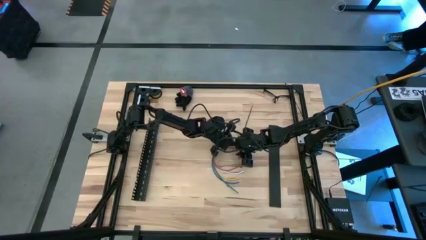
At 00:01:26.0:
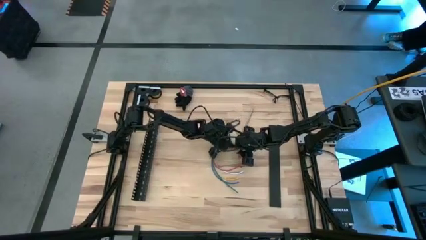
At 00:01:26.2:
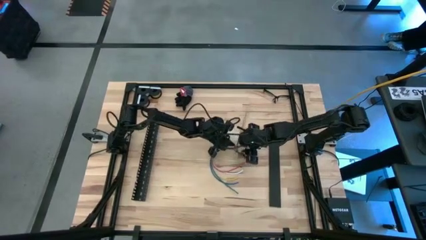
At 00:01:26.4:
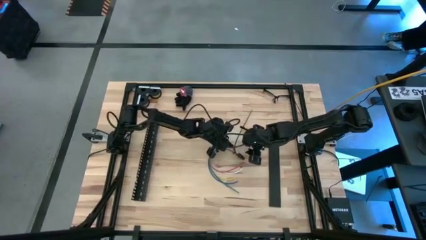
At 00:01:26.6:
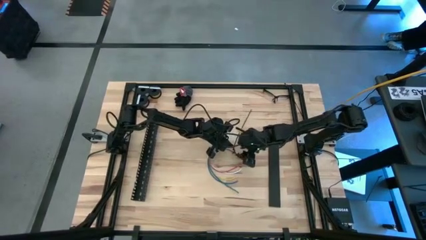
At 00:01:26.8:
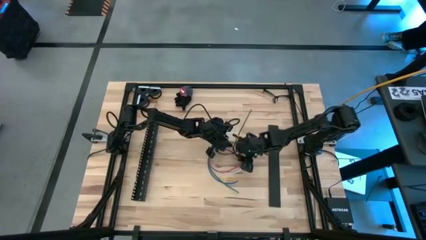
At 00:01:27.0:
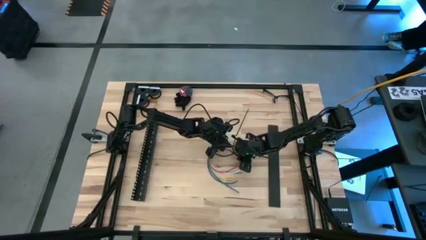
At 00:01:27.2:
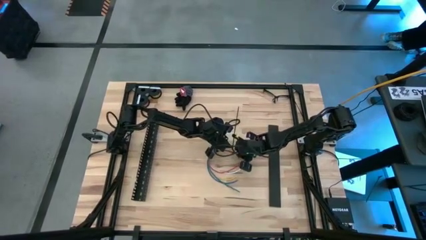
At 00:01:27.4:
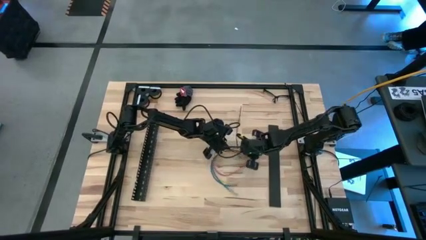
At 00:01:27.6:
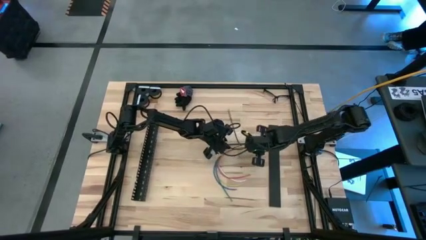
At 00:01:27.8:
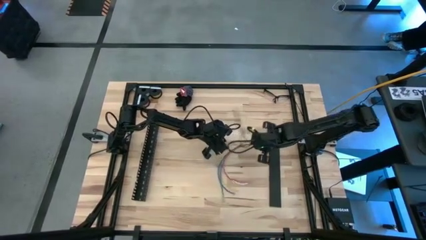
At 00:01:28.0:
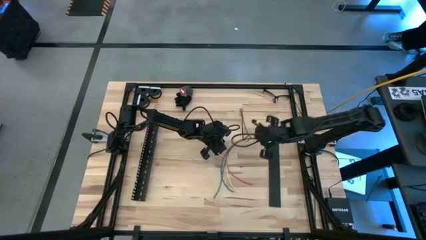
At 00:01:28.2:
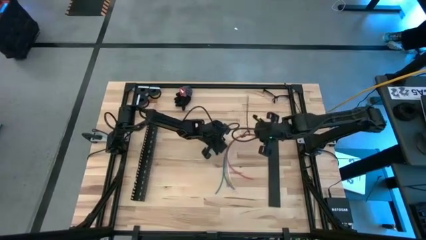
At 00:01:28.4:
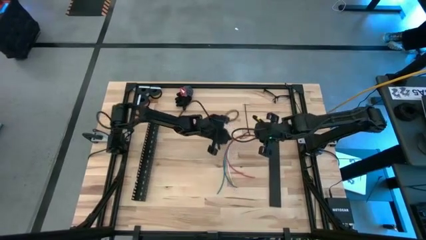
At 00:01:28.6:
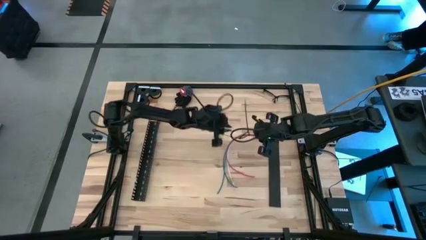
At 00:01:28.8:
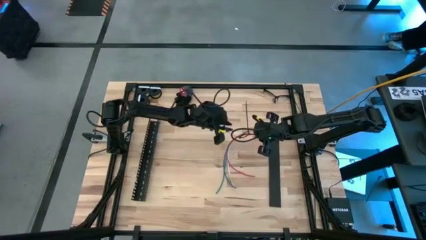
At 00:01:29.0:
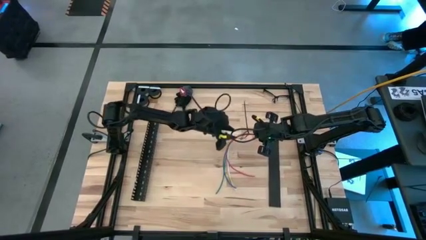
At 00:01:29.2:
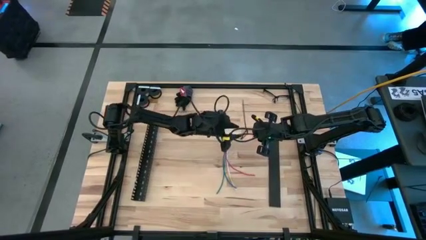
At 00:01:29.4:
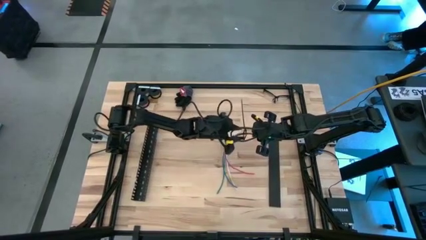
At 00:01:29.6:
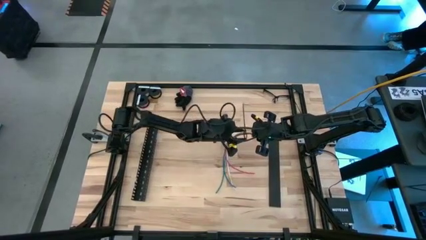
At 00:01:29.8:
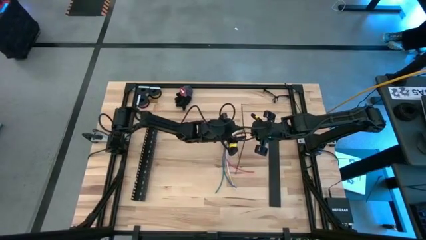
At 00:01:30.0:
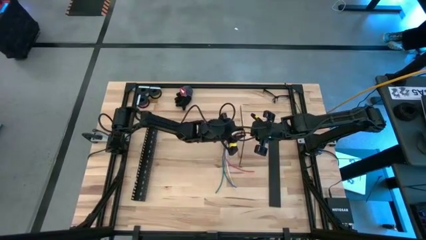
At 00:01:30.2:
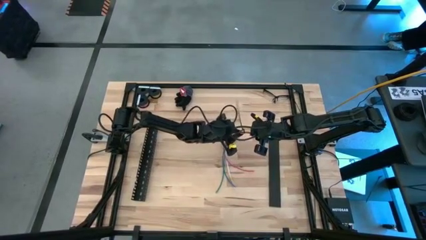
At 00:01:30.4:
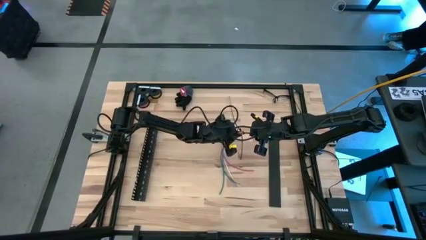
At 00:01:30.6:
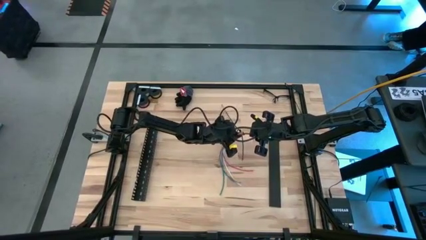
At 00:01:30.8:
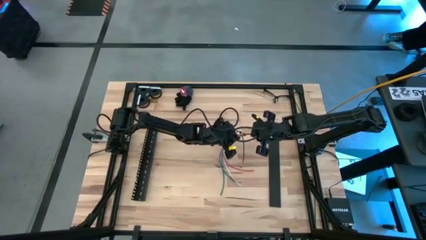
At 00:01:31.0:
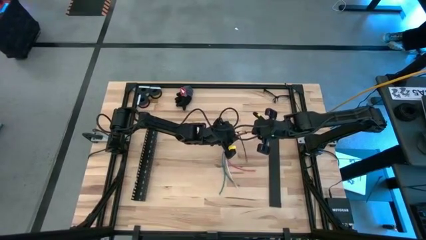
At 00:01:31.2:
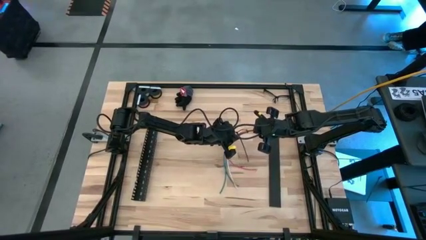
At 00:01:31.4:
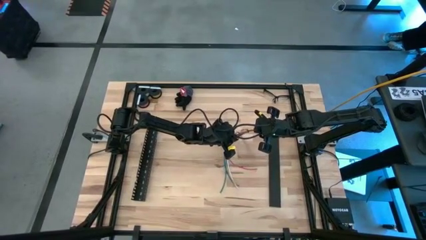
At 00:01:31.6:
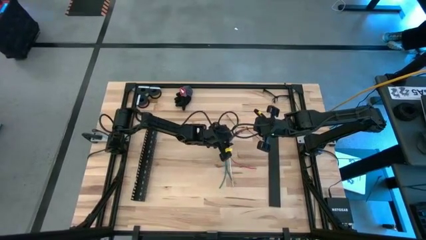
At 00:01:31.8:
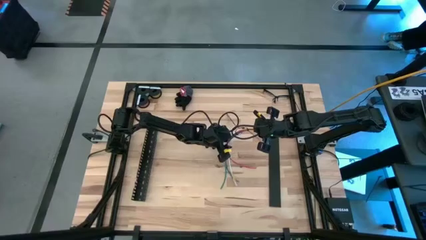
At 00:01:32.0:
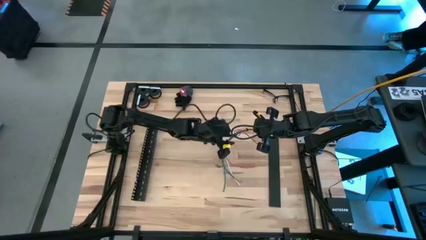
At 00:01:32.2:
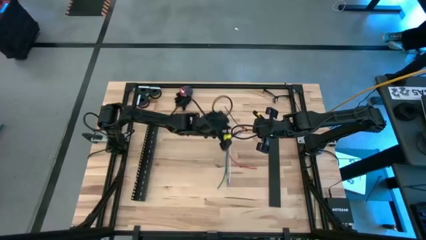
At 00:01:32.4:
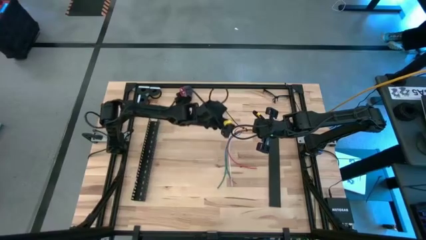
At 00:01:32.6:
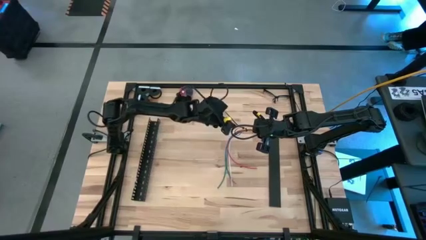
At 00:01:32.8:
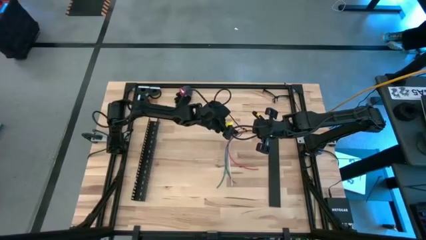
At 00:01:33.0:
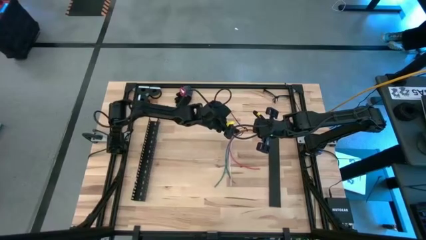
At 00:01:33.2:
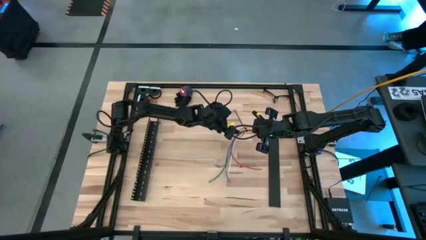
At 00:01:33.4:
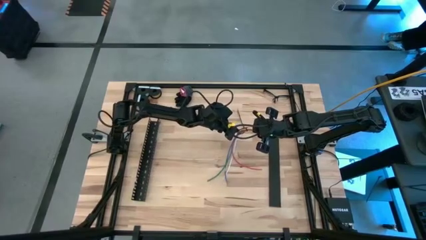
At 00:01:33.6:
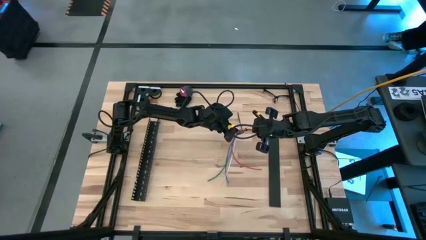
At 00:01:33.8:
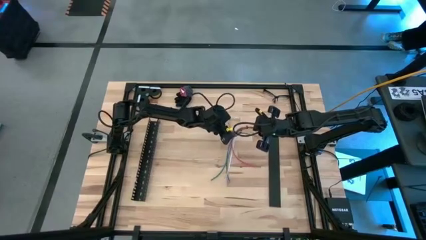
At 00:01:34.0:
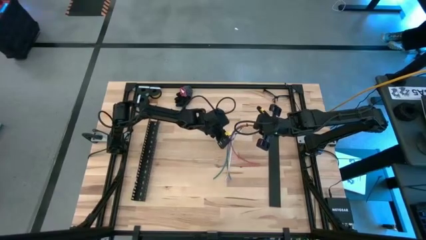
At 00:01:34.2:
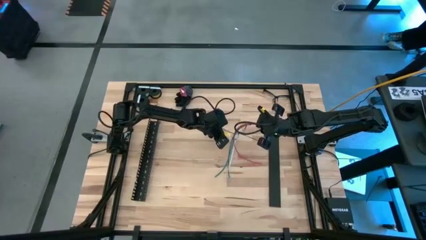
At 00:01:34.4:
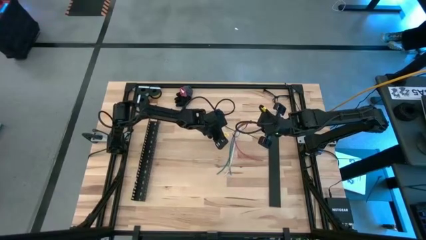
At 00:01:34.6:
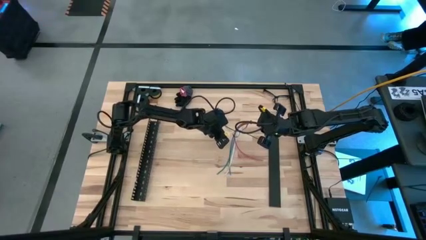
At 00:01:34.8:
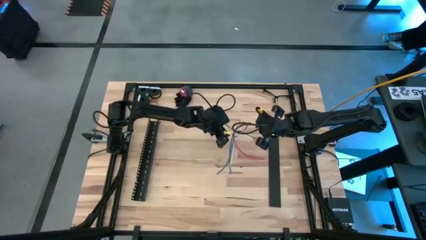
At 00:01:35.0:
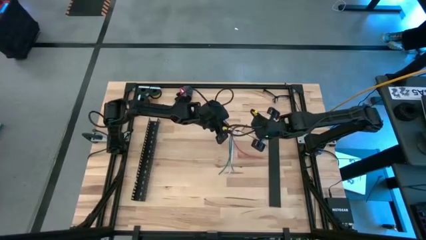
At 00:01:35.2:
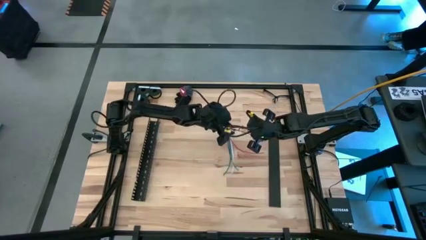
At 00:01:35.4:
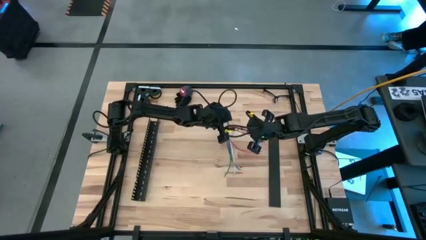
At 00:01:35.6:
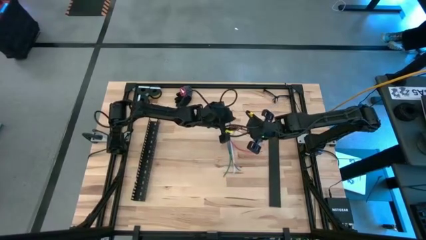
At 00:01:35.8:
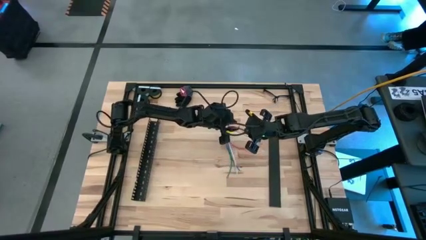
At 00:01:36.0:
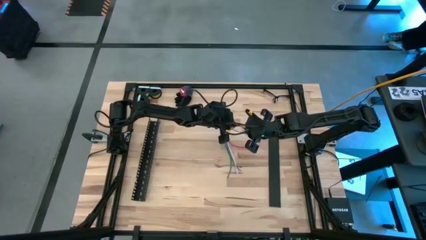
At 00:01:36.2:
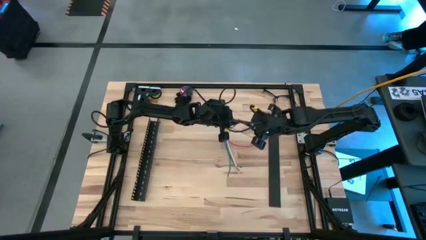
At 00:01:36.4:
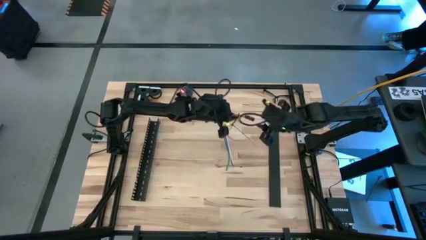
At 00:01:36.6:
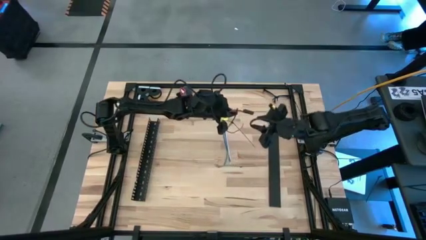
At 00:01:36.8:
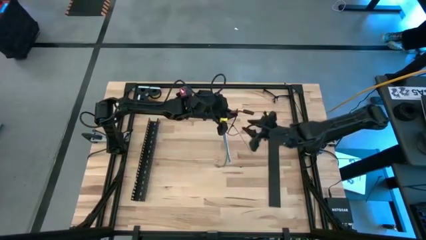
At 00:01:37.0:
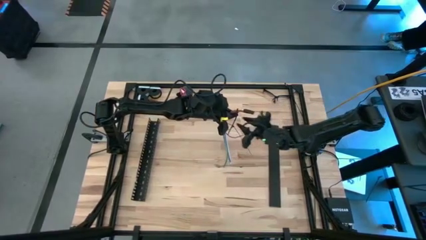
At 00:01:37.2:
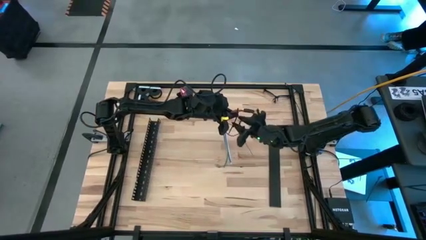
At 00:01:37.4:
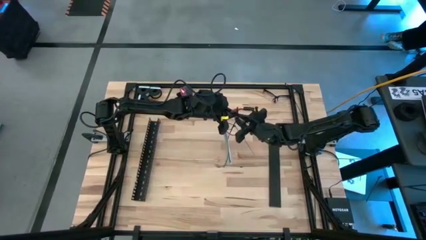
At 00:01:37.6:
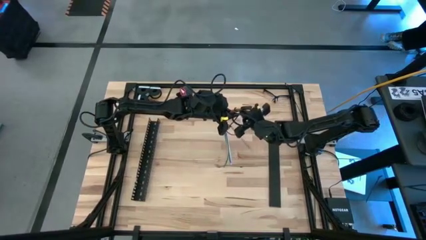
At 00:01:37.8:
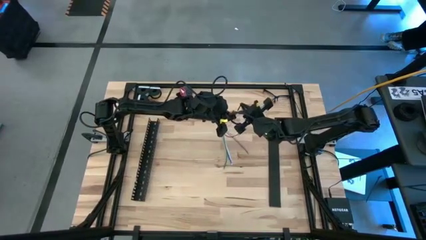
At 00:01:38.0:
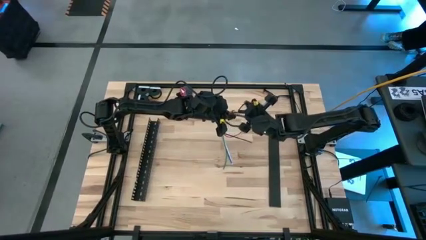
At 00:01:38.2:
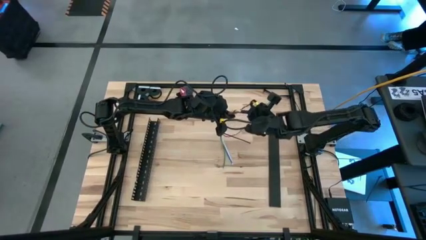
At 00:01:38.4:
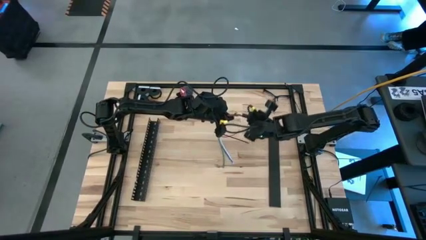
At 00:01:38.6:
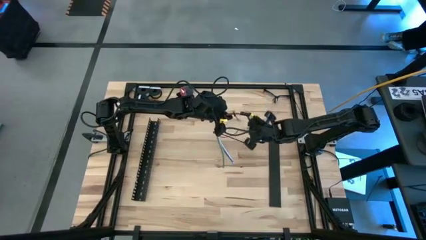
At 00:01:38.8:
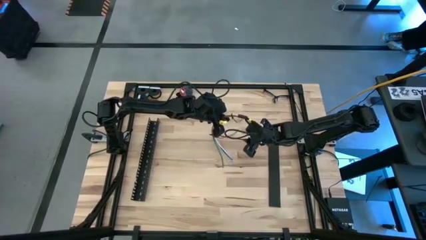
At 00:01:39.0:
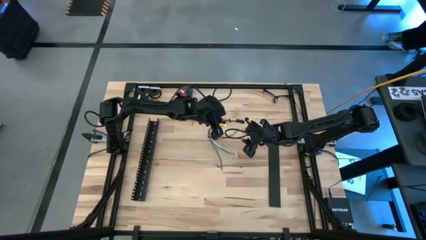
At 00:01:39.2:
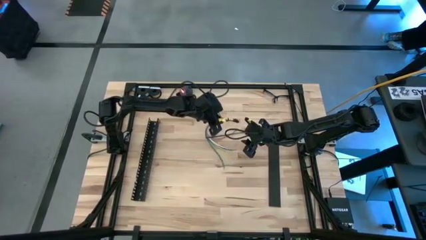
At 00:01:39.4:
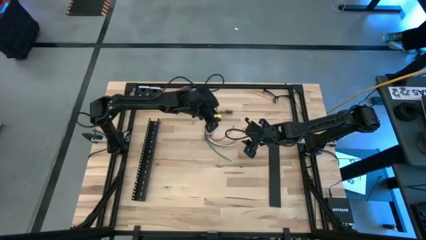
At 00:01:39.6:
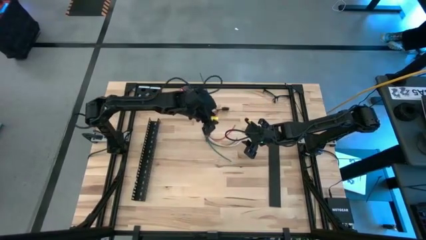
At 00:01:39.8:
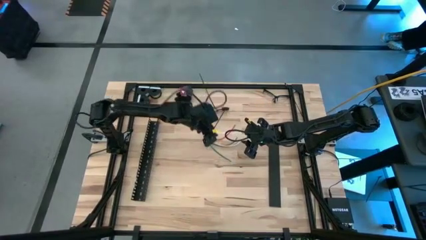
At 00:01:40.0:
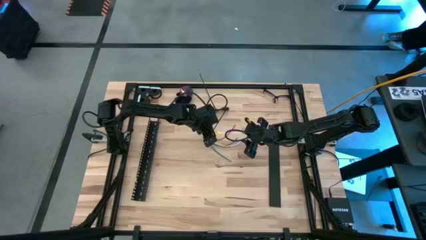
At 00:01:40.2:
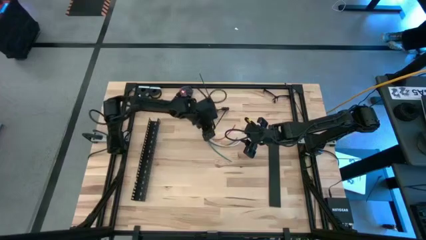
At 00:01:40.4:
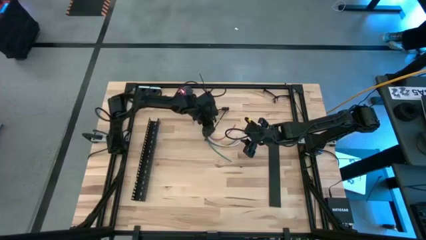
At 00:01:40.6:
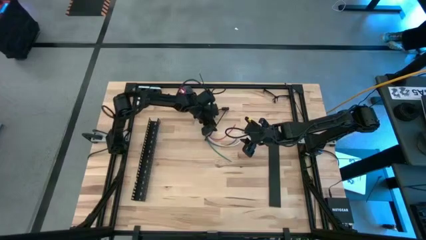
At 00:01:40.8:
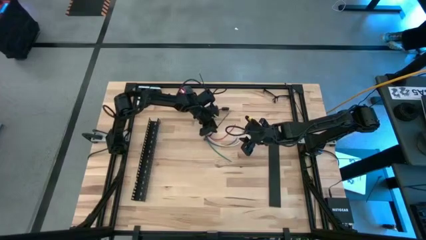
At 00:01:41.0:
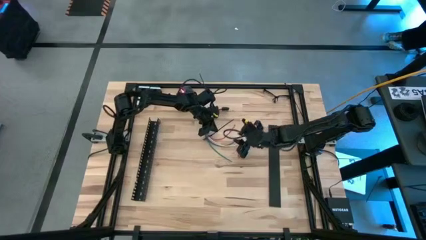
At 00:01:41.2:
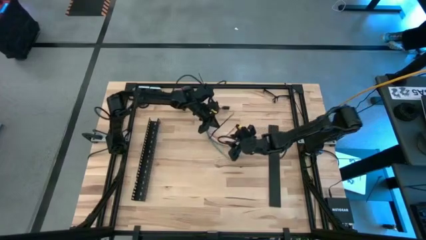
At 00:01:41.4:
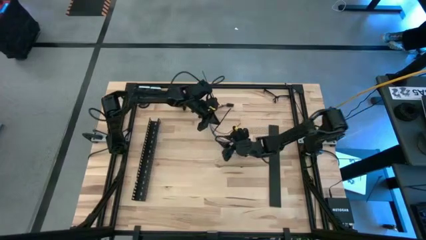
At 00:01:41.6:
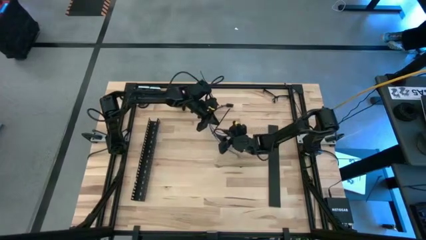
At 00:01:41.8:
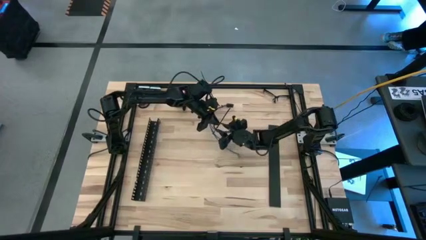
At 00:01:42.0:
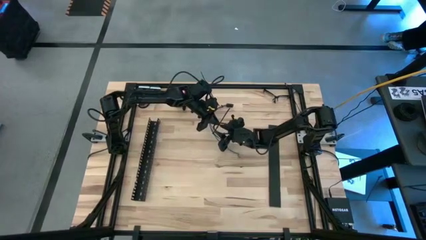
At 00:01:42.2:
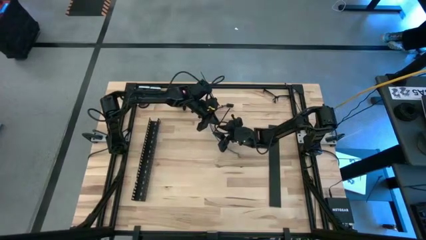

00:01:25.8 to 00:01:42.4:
Task: Ziptie cables
Wrap the cable wires with the black zip tie
